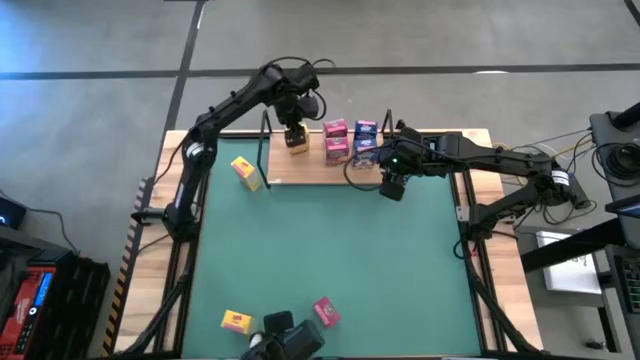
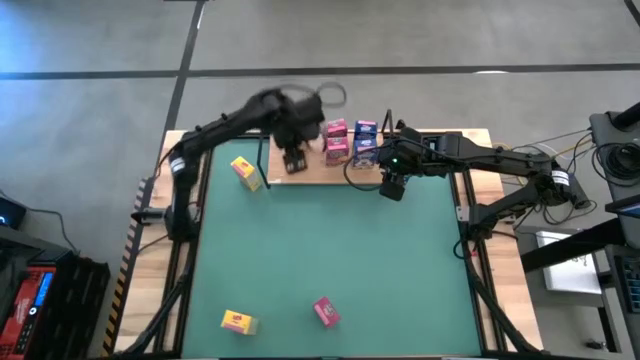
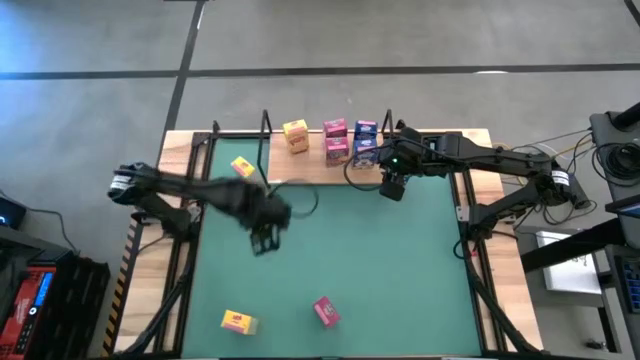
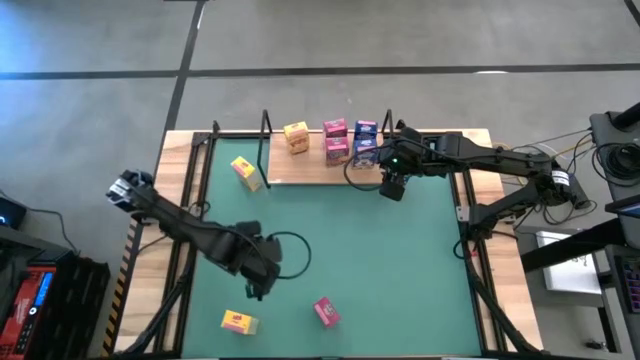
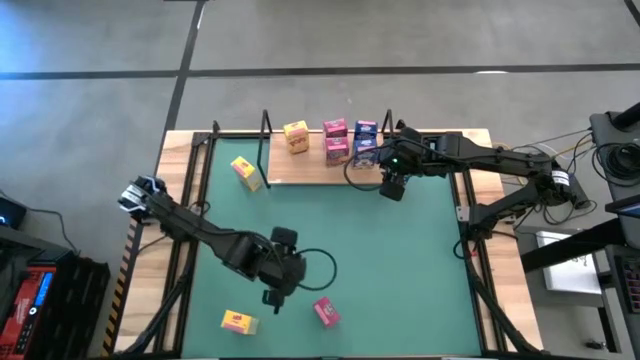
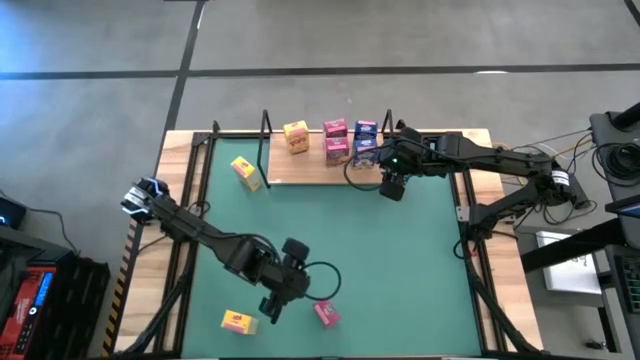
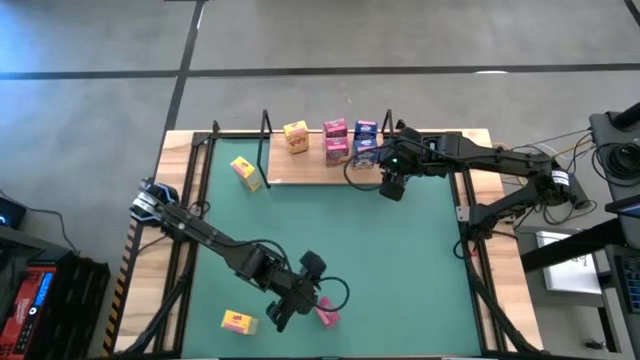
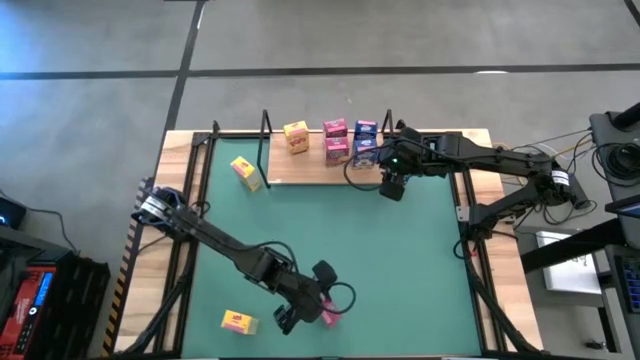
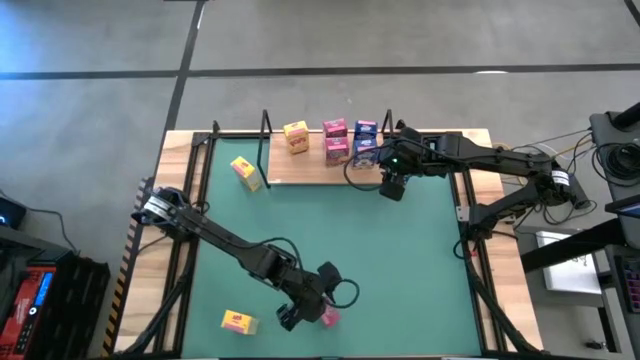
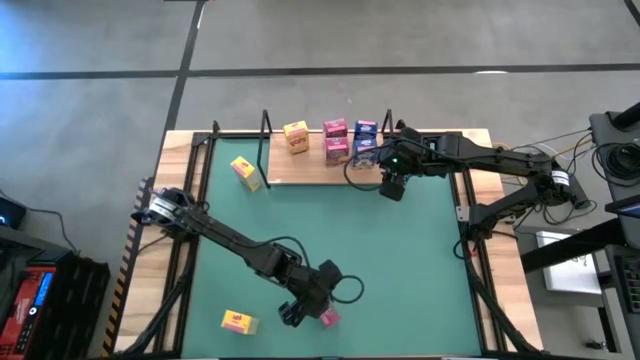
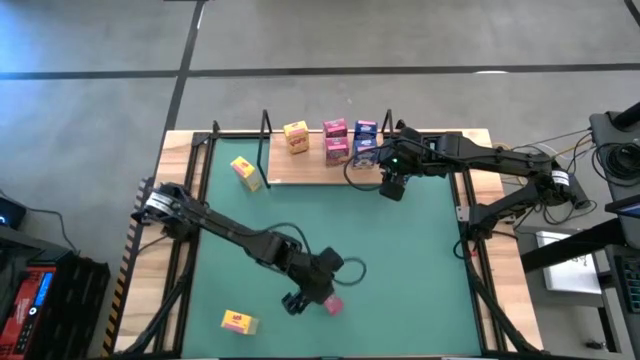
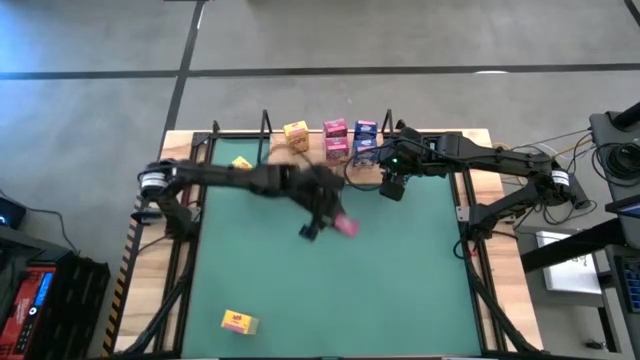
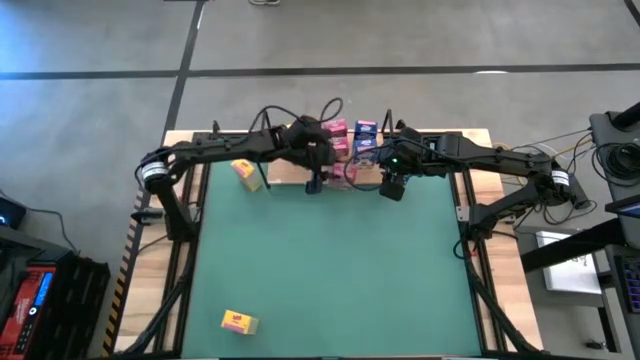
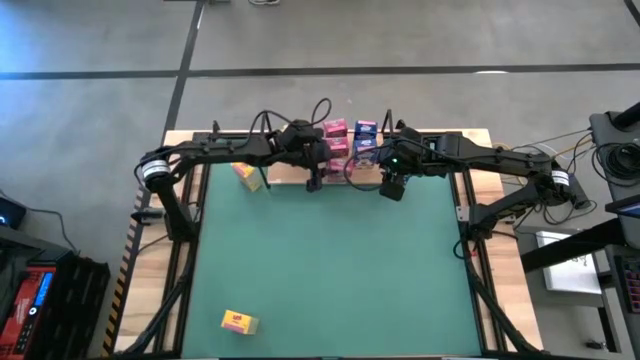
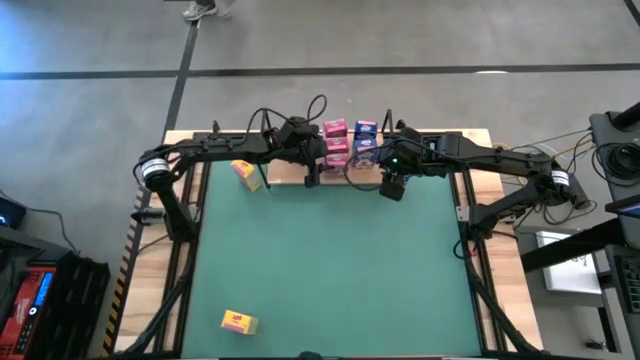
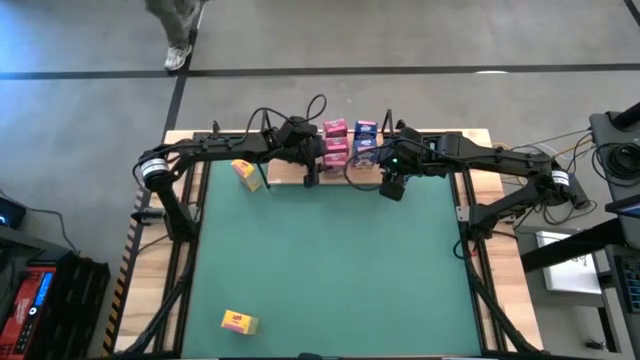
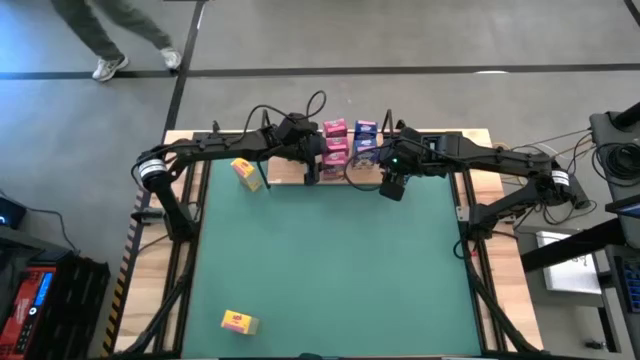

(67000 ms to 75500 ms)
Task: Stack cereal on shelf
Put the red cereal box on the shelf and align with the other red cereal boxes

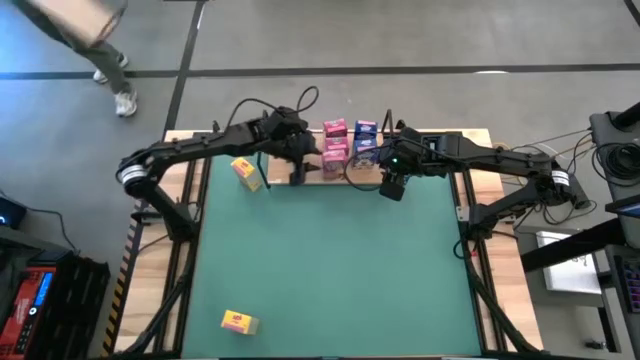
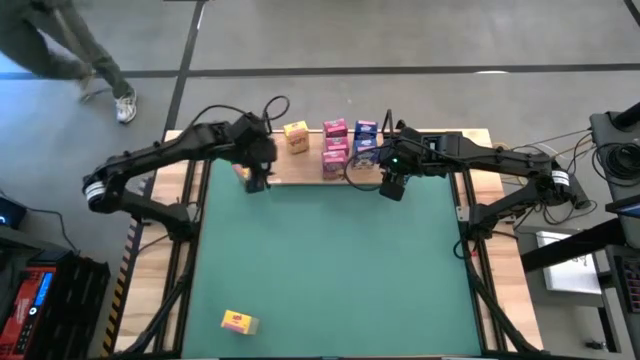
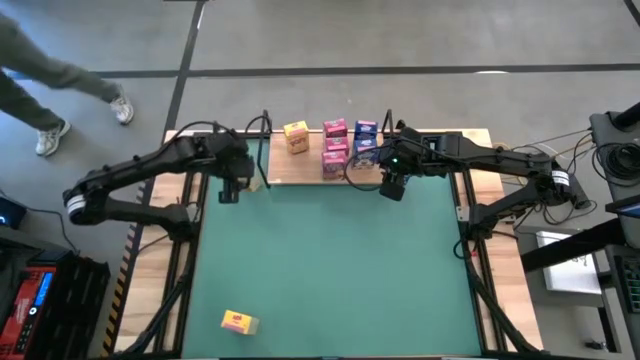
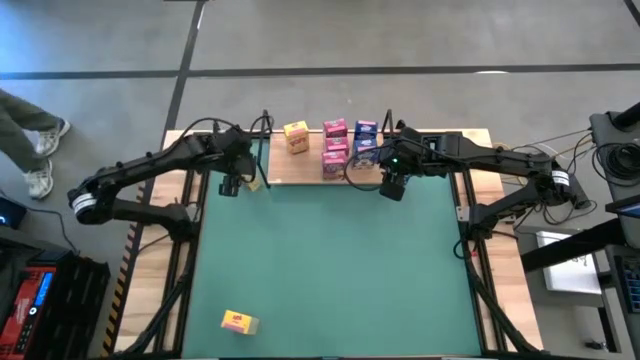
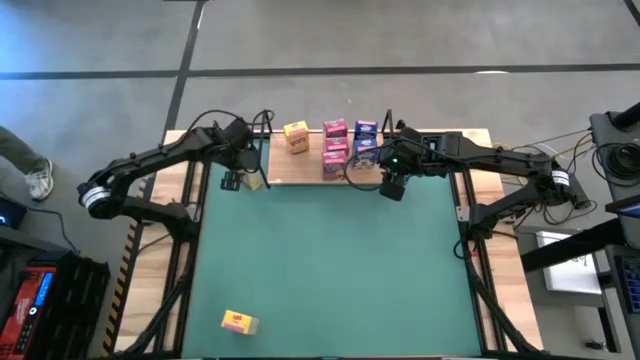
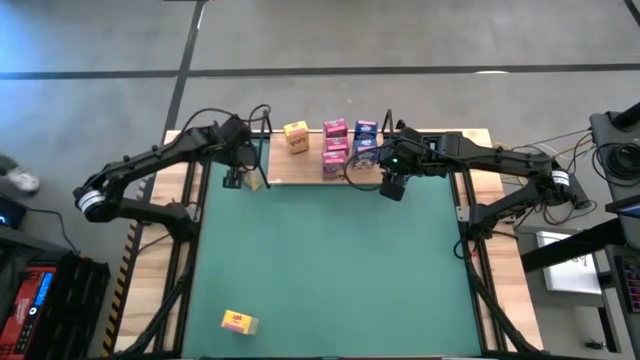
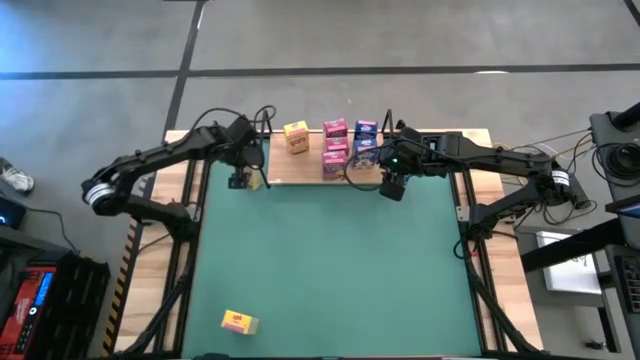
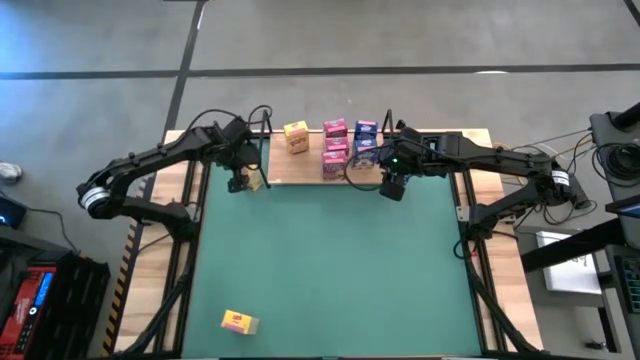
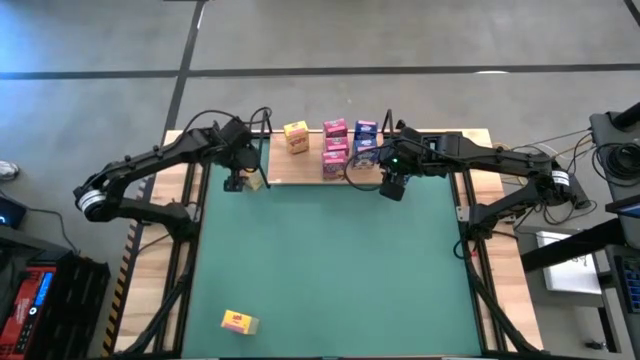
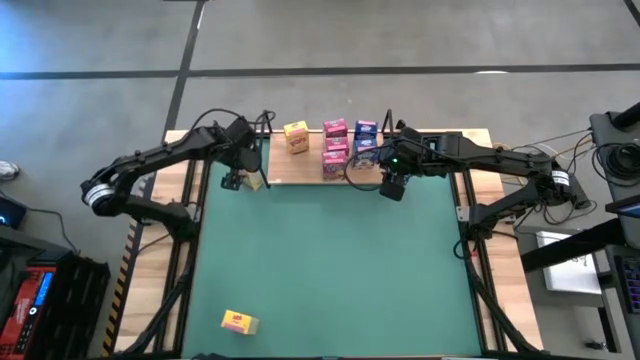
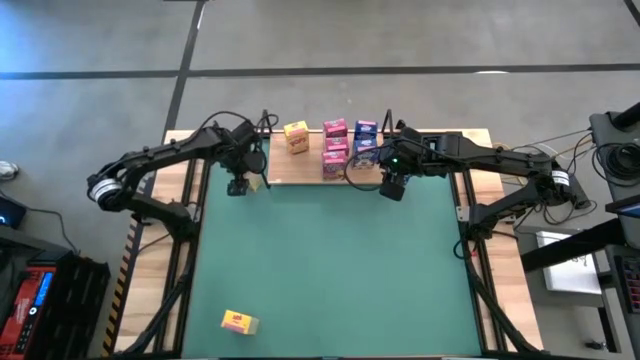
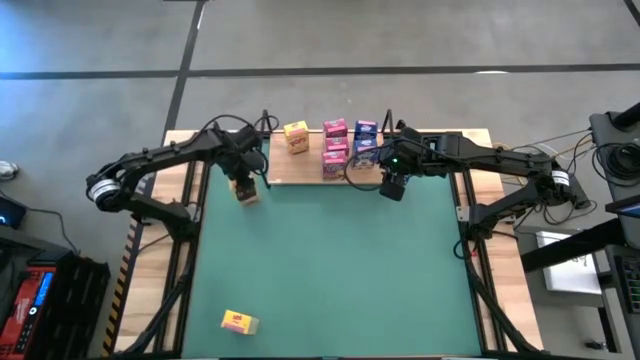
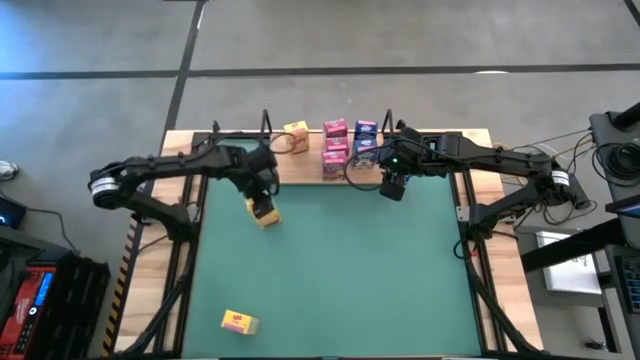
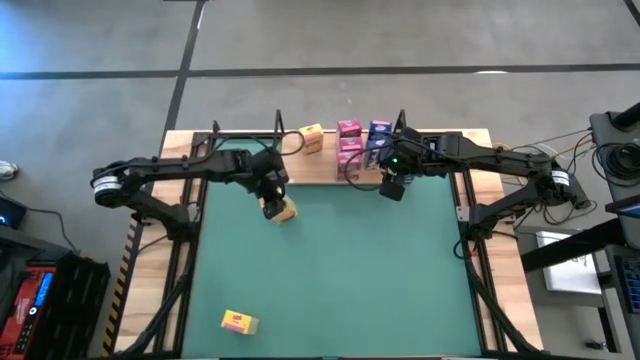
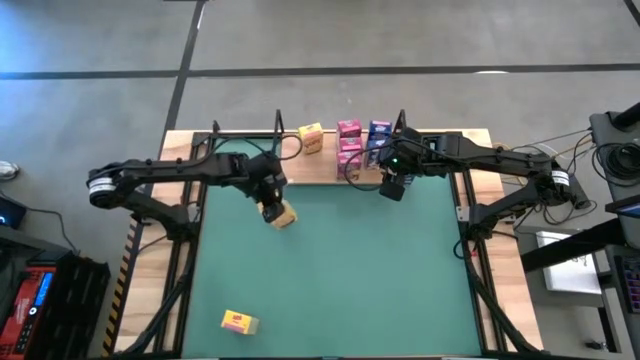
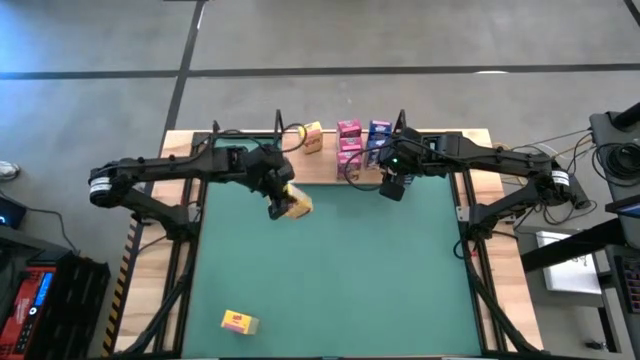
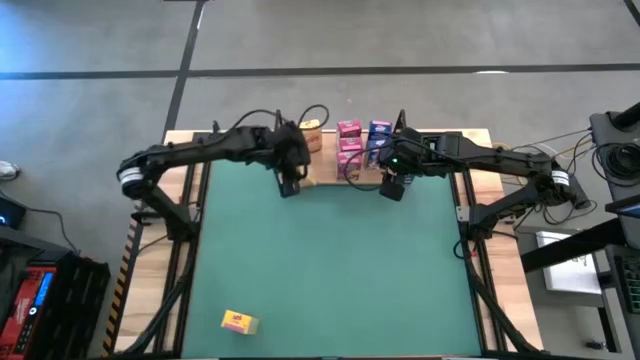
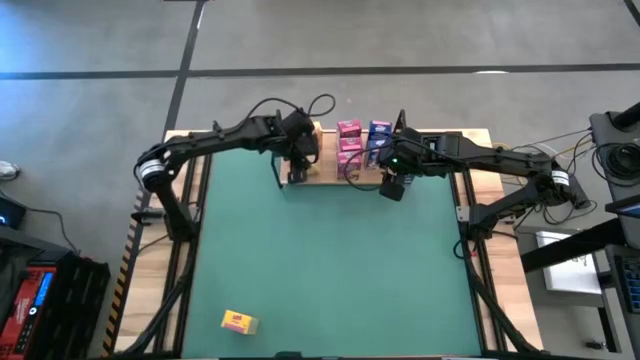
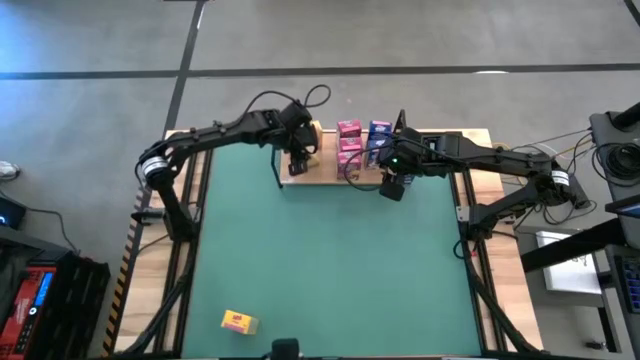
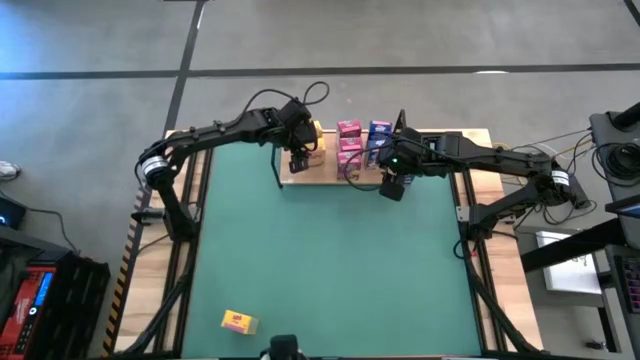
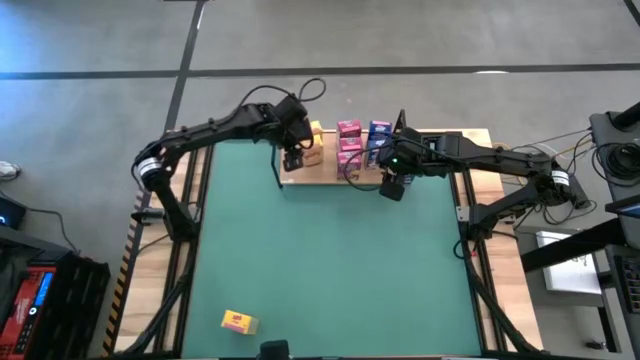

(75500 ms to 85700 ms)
Put the top yellow cereal box on the shelf and align with the other yellow cereal box

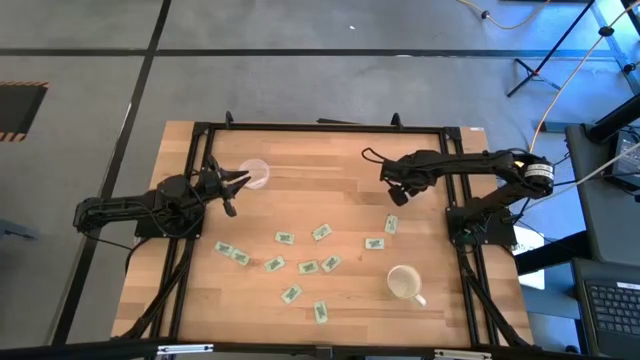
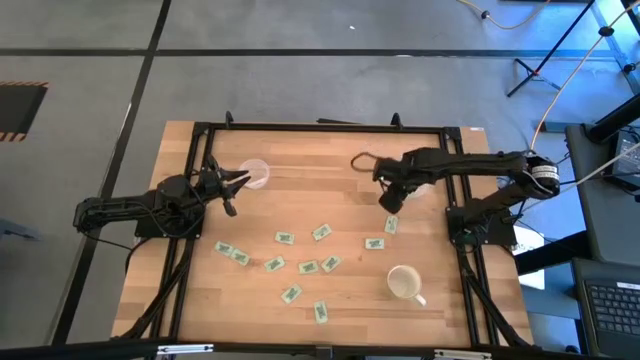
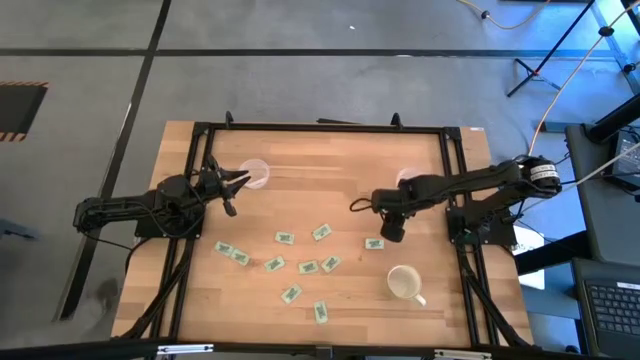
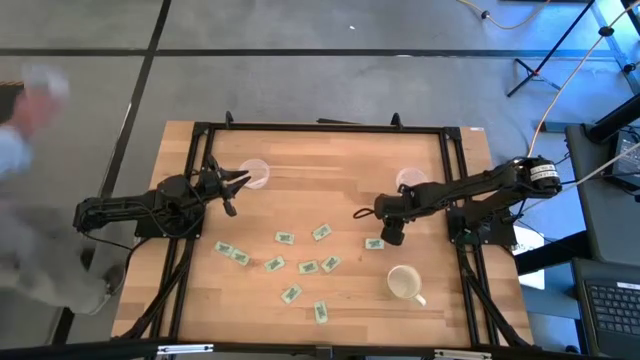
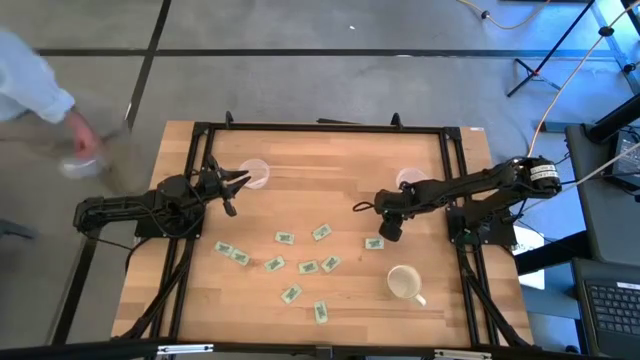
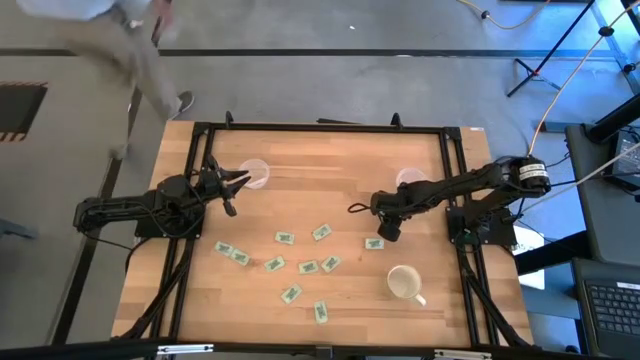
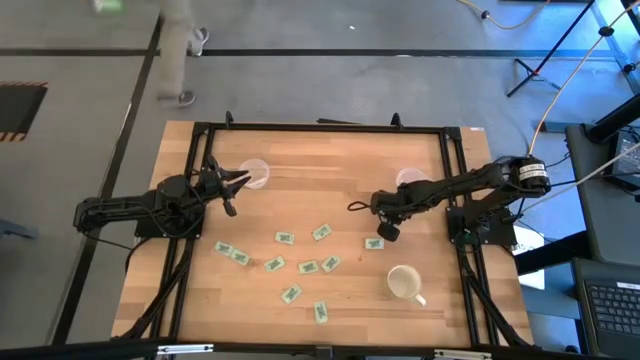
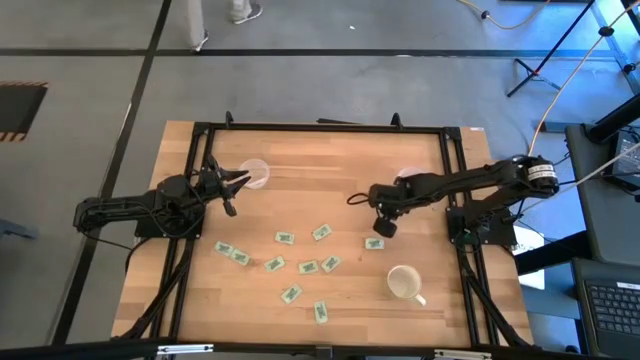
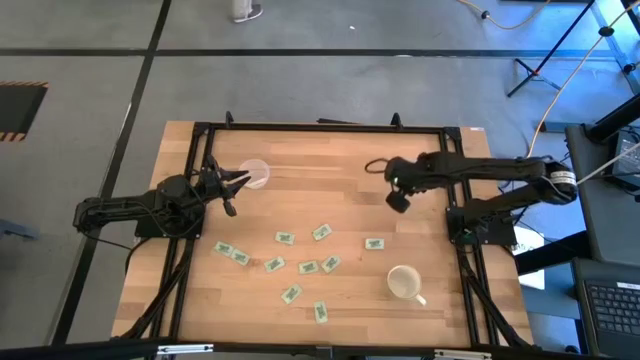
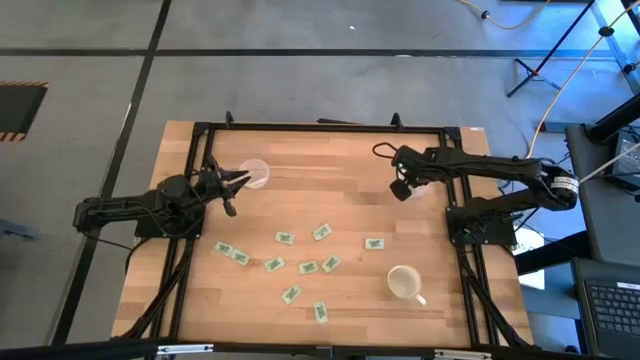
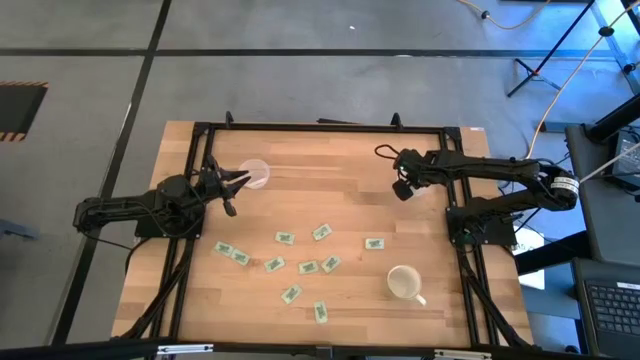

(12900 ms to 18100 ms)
Task: Pick and place Stevia / Truvia into bins
Put the stevia packet into the right transparent container
